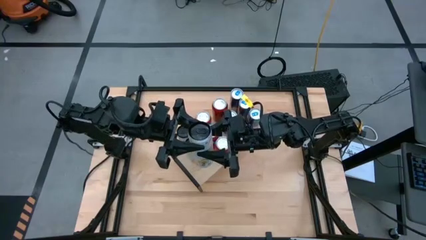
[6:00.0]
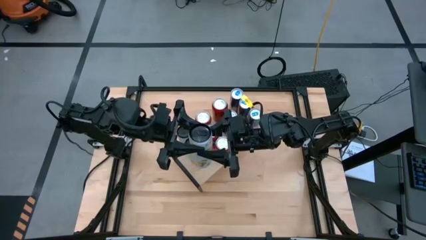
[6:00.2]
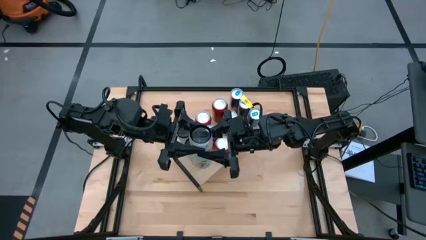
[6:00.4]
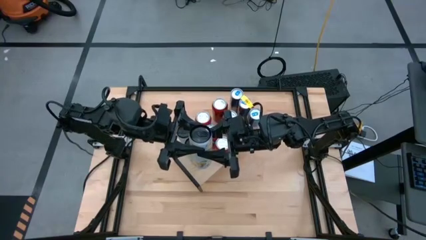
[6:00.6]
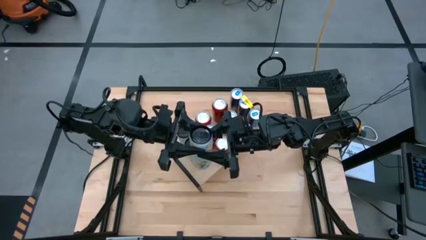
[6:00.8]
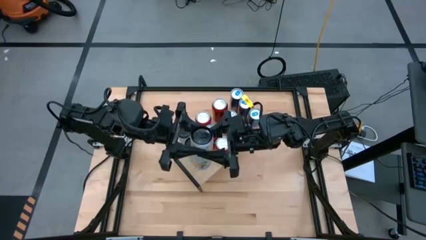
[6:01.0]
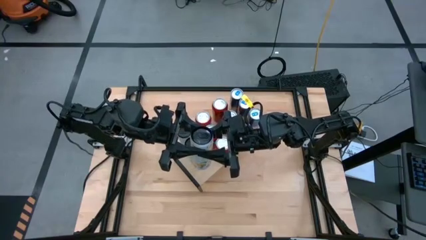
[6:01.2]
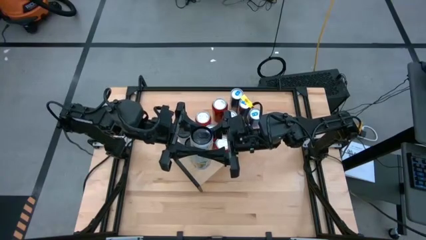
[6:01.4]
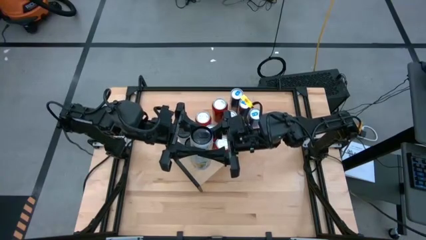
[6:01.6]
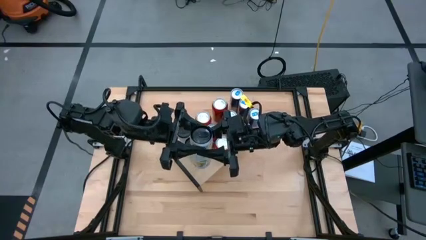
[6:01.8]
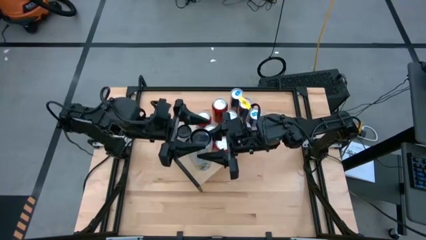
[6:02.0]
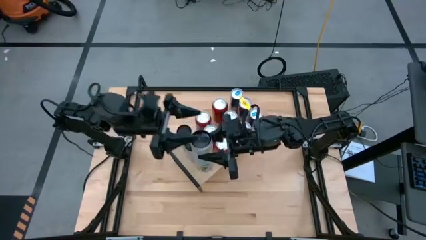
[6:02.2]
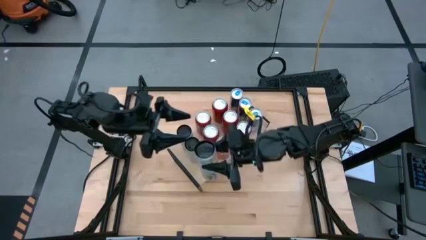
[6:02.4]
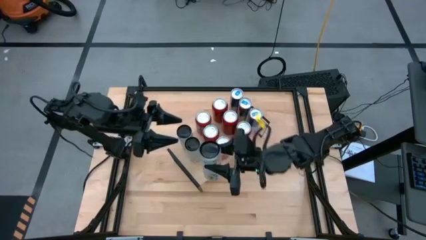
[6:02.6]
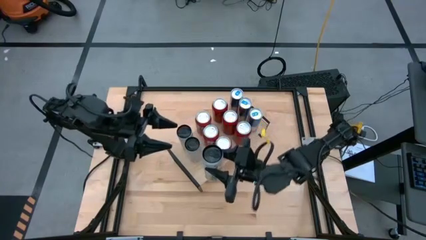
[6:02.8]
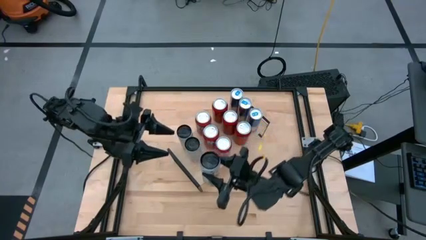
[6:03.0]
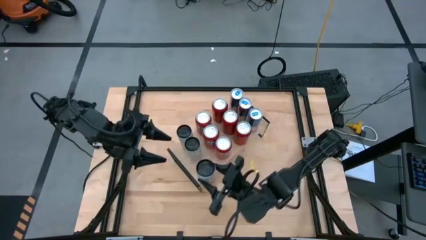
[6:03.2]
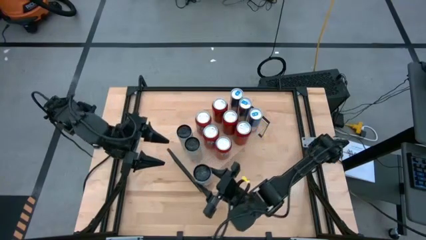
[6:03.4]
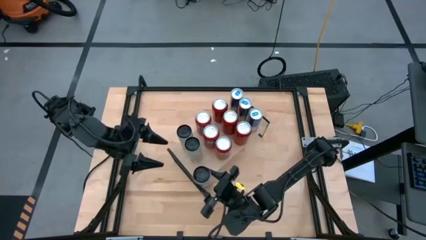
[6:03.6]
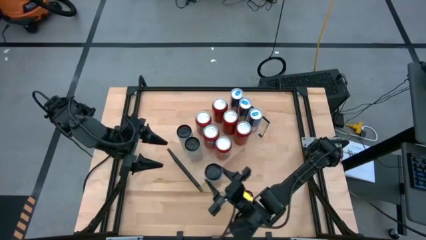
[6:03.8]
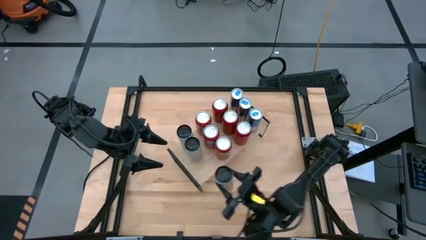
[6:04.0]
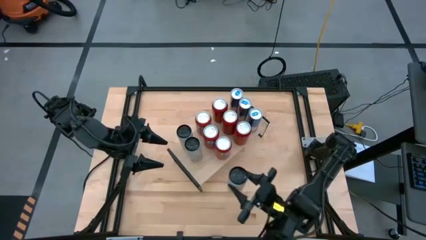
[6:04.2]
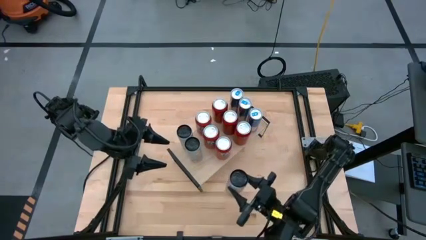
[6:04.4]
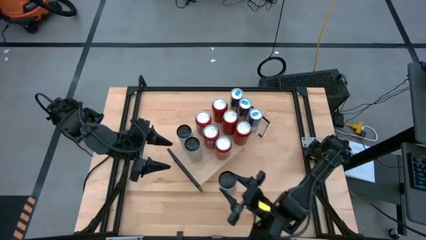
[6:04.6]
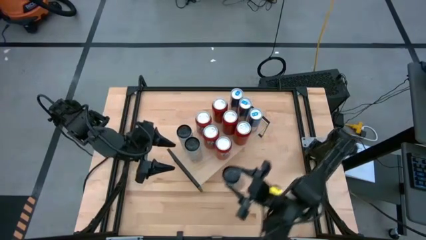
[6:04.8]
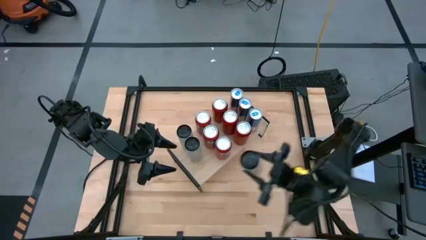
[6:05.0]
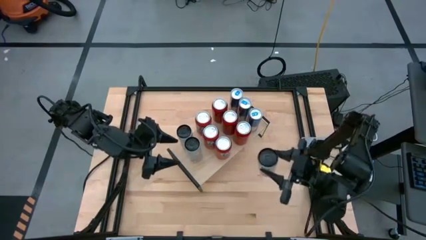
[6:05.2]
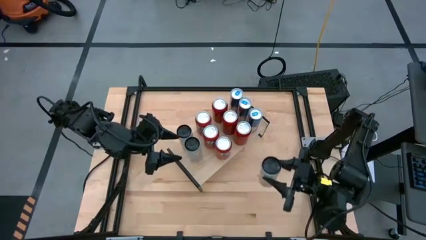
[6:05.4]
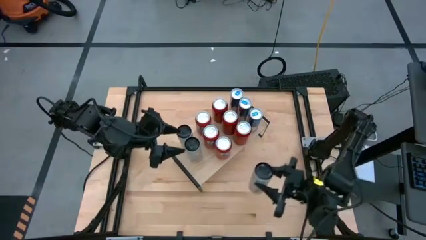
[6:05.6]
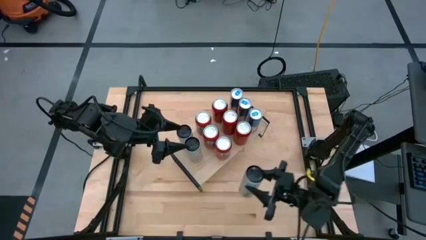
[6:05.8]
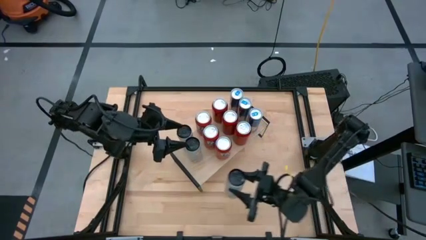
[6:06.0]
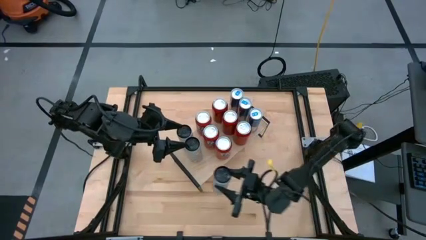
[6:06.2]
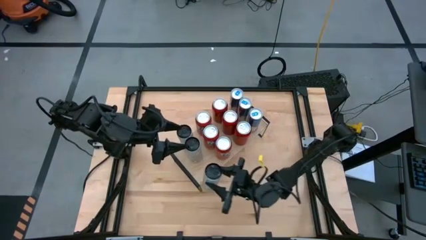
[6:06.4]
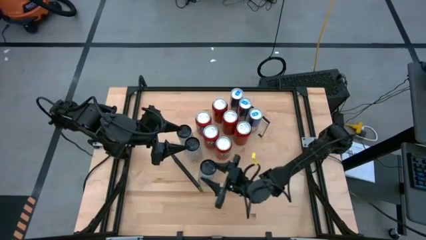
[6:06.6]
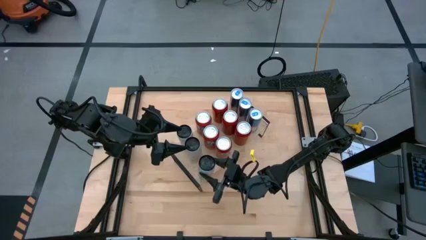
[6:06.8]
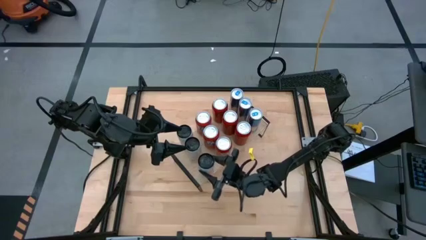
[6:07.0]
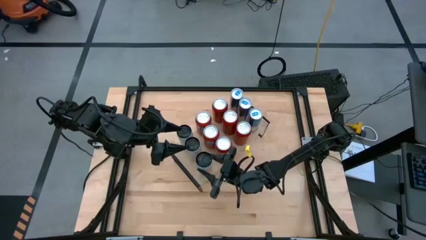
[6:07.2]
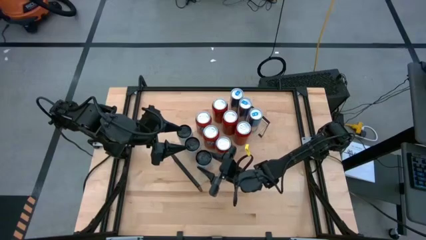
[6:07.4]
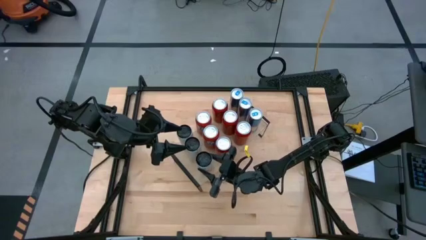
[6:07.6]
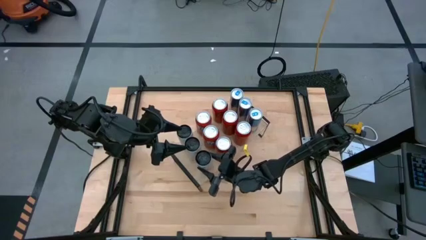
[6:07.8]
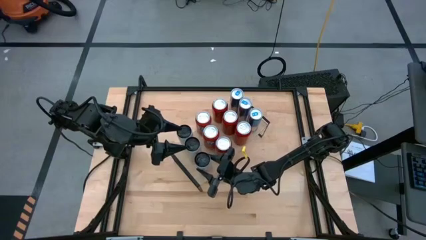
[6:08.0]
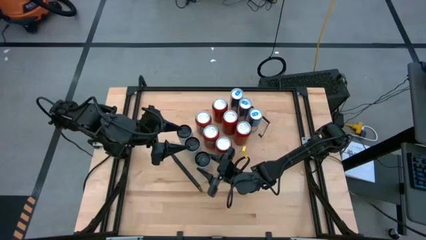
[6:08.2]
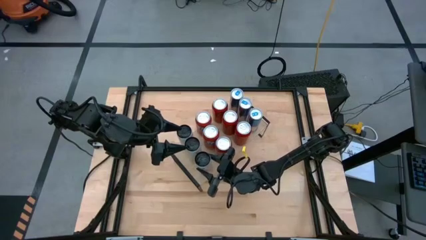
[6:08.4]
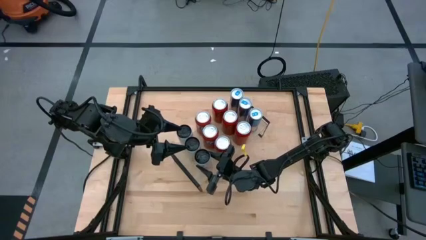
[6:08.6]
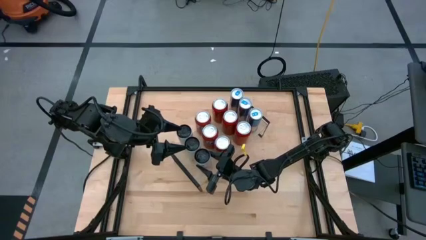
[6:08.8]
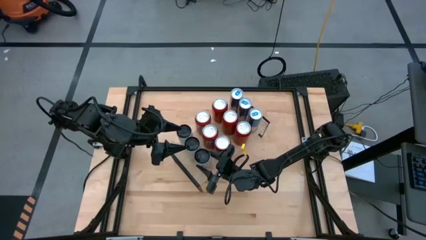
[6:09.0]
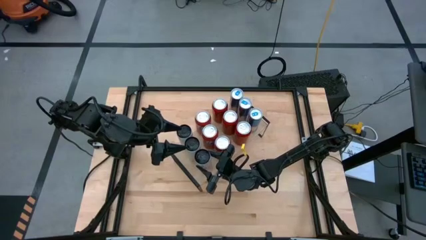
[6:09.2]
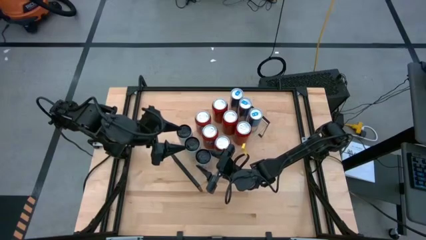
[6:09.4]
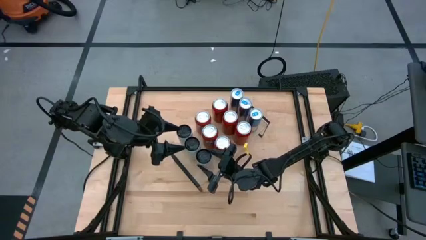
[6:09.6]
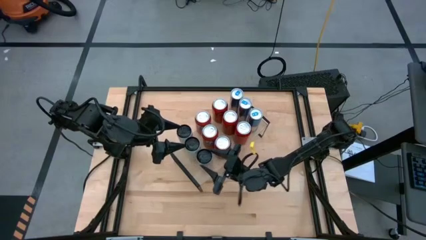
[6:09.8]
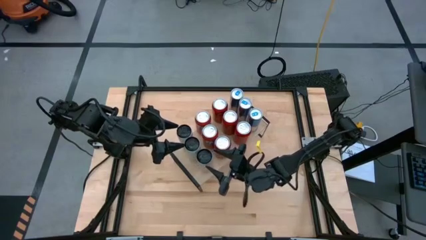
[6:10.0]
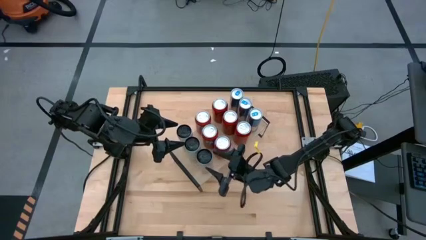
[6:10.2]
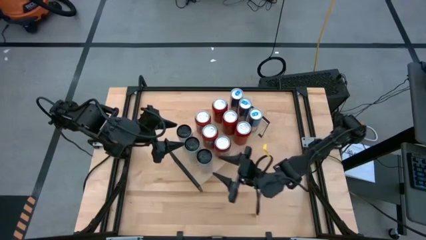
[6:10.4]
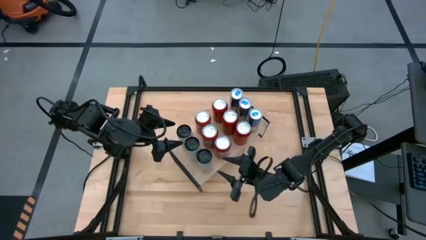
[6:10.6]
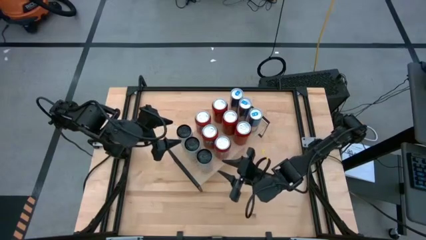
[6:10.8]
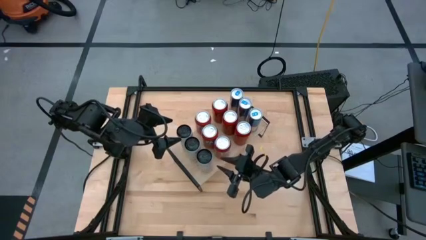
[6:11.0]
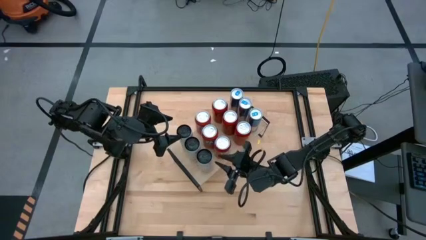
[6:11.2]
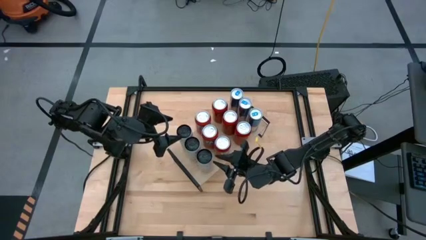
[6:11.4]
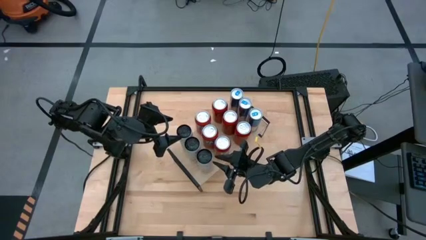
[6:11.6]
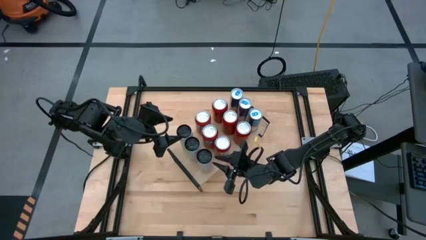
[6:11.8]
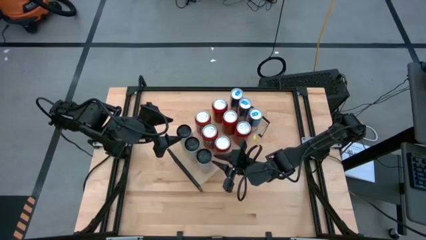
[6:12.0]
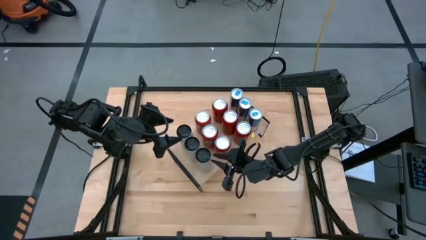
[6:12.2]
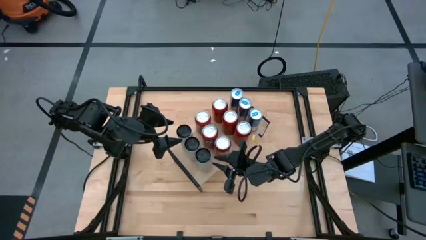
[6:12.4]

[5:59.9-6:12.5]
Task: Place canned beverage on shelf
Put the white soda can on the shelf

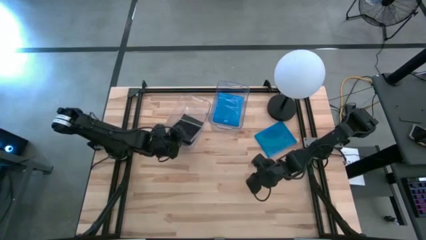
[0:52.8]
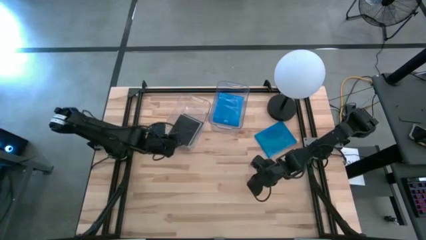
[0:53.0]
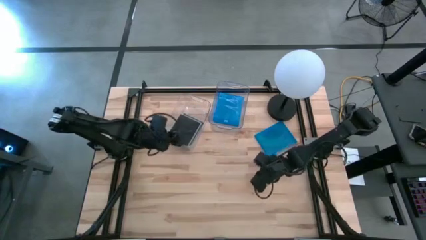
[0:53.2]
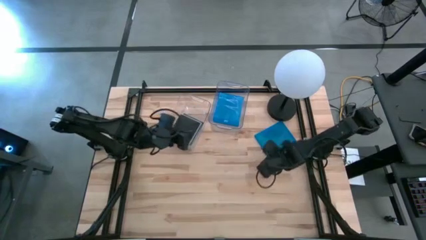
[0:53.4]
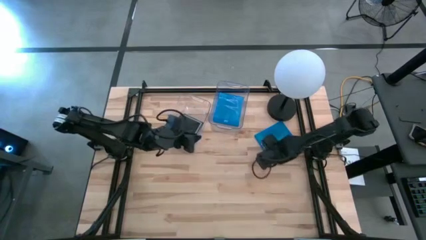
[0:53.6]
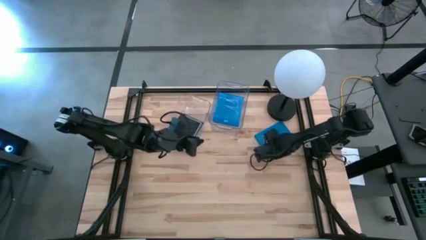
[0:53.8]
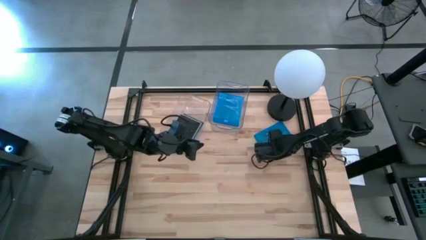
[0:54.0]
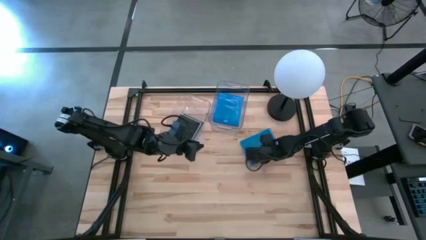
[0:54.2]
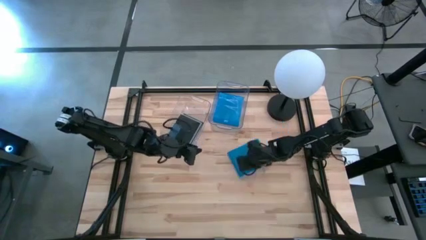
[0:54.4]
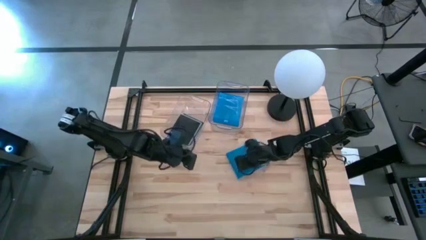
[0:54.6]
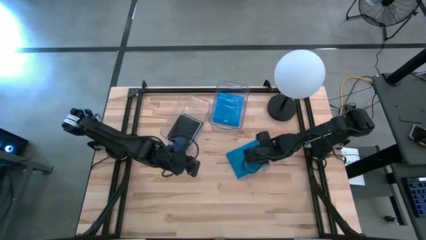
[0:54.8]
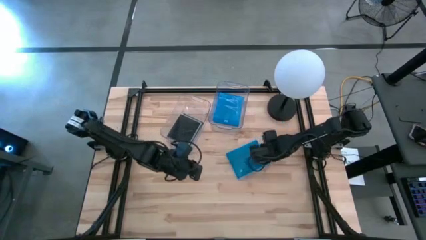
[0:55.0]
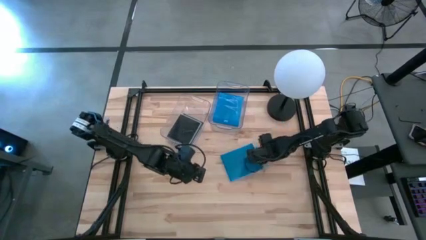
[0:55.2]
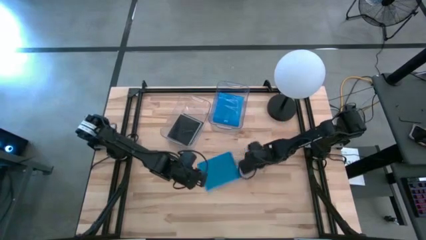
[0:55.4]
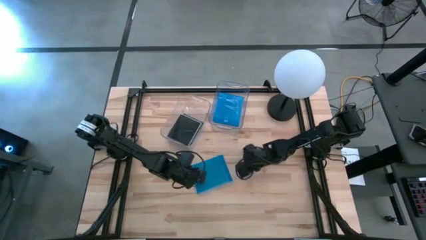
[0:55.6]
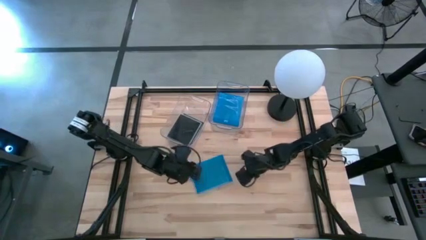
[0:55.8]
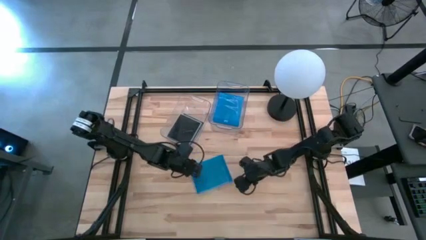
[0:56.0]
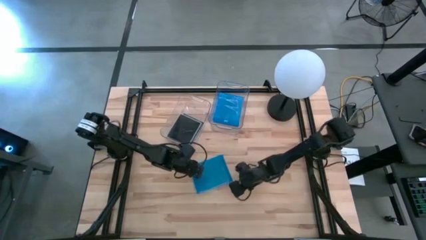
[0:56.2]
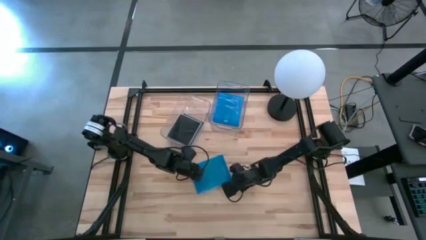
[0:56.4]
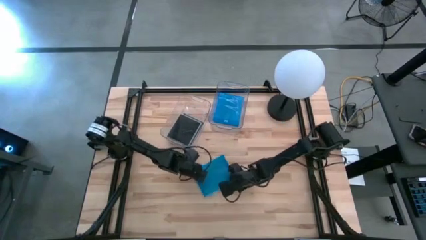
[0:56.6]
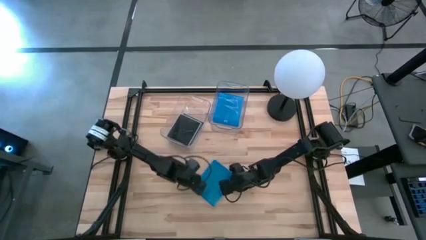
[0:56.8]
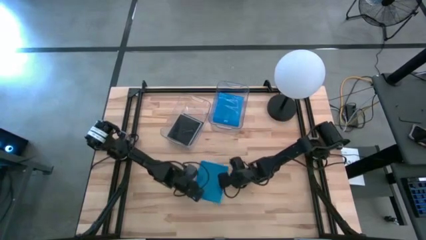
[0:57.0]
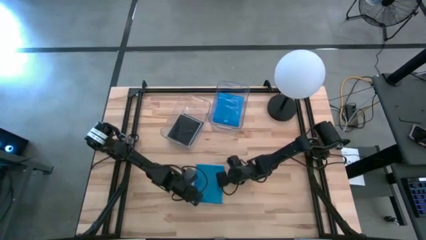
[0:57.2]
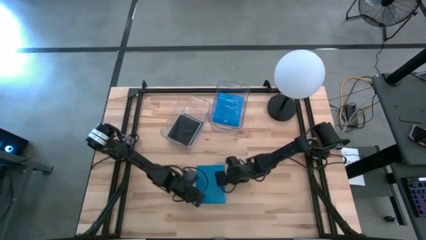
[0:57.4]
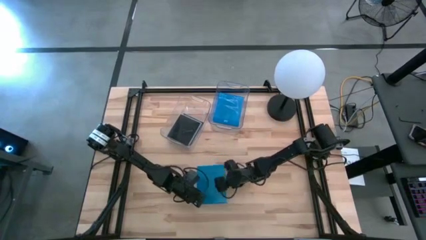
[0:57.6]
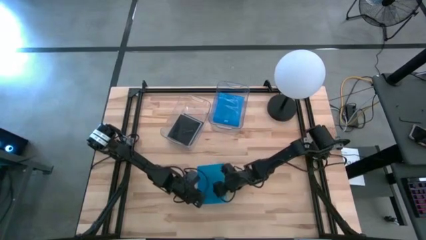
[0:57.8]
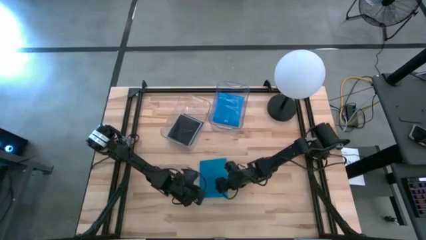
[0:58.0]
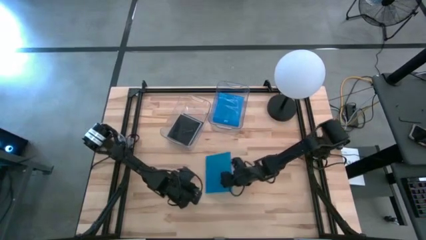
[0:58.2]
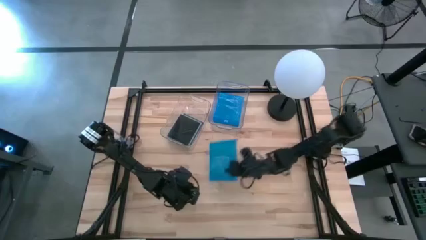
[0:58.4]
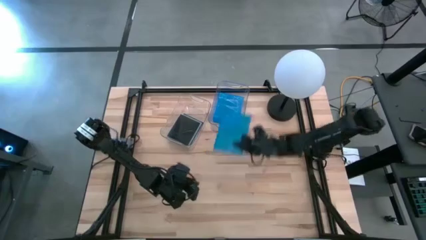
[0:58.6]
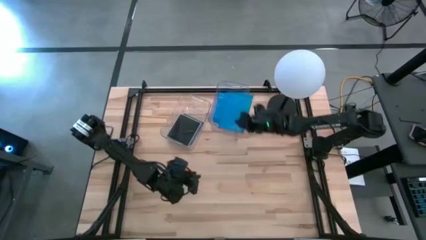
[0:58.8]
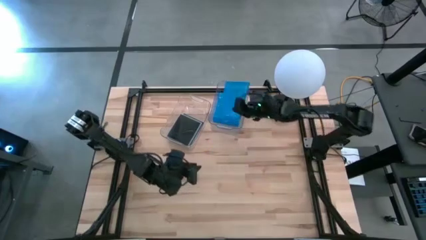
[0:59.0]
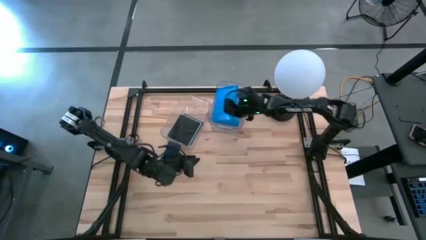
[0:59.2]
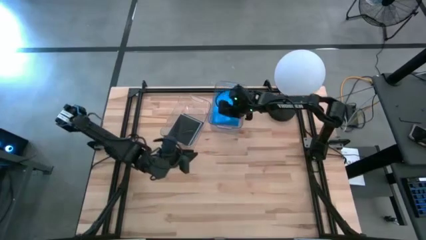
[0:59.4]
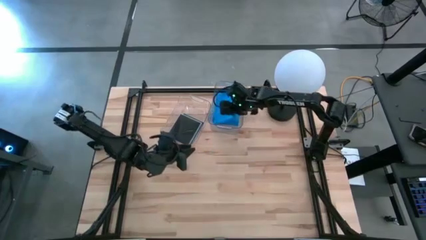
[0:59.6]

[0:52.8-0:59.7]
Task: Pick & place jewel cases by type
Put the blue blu tray case into the right transparent bin
